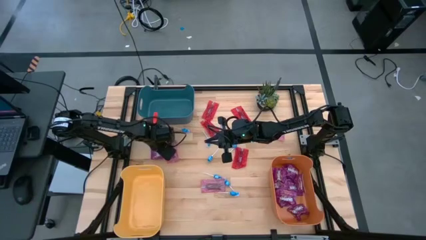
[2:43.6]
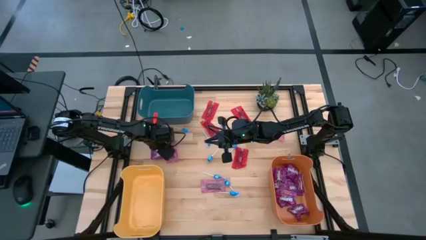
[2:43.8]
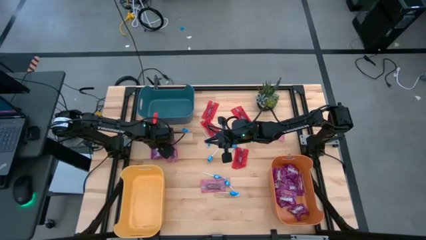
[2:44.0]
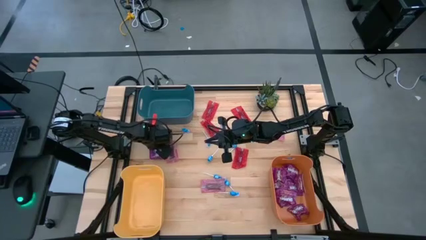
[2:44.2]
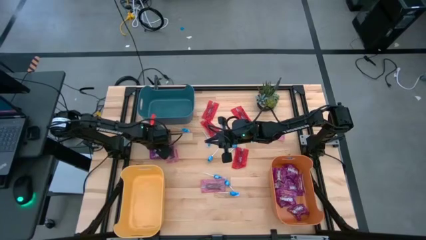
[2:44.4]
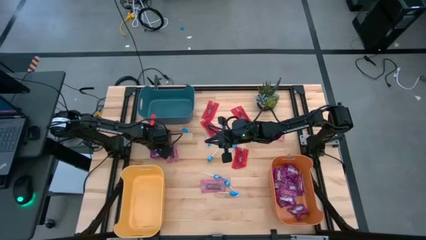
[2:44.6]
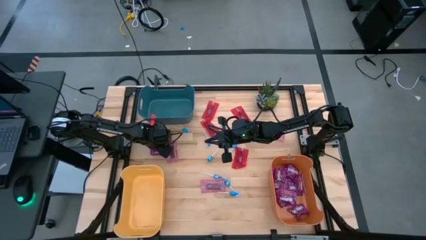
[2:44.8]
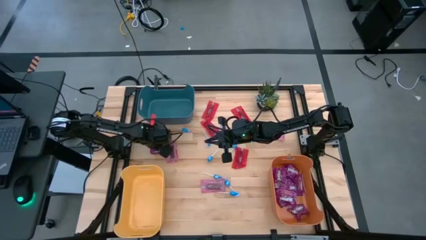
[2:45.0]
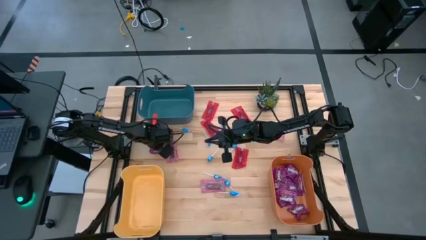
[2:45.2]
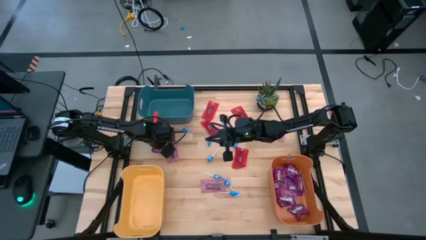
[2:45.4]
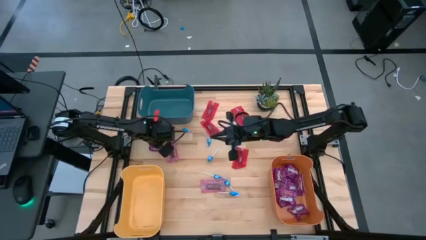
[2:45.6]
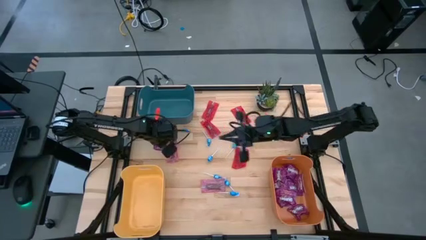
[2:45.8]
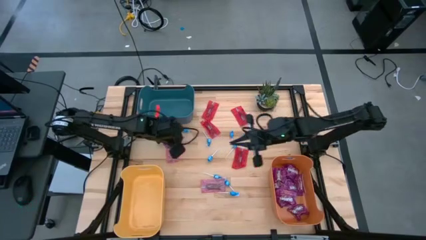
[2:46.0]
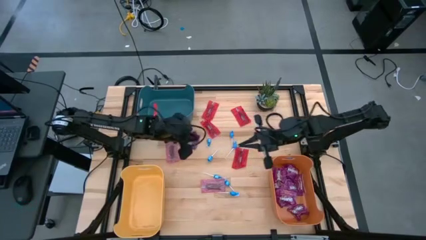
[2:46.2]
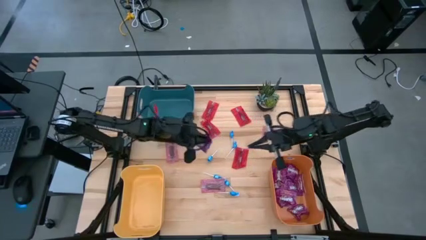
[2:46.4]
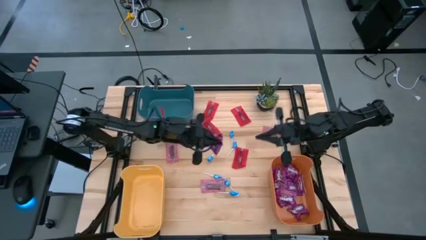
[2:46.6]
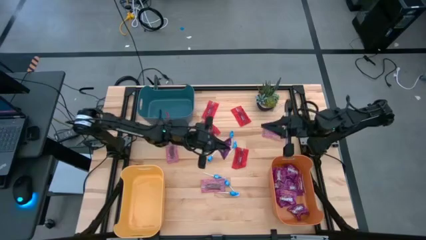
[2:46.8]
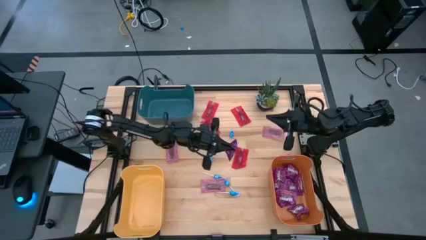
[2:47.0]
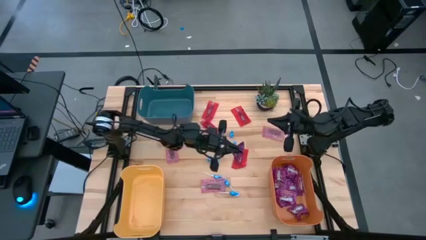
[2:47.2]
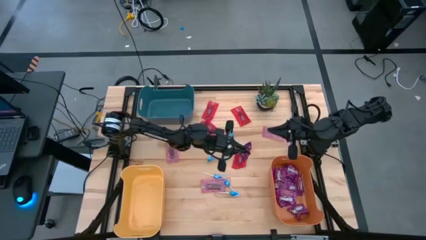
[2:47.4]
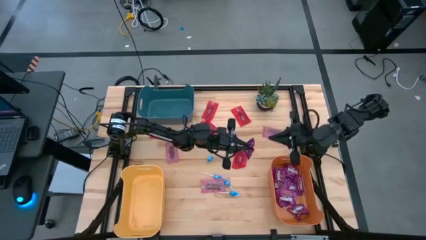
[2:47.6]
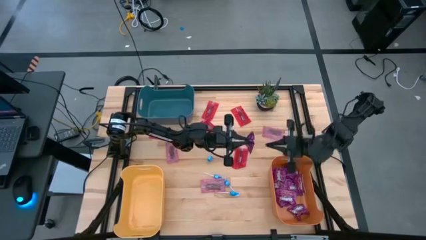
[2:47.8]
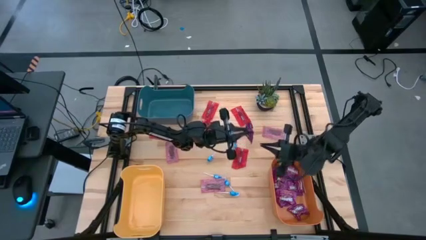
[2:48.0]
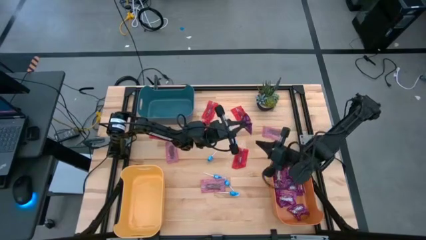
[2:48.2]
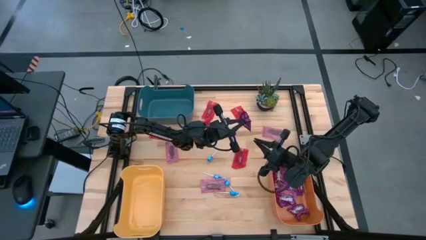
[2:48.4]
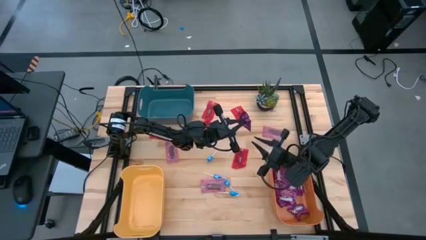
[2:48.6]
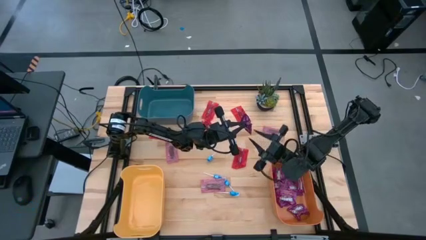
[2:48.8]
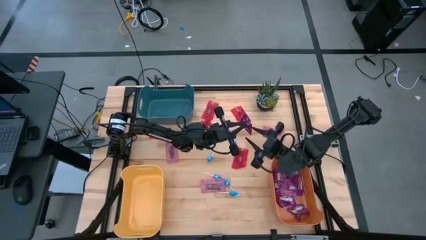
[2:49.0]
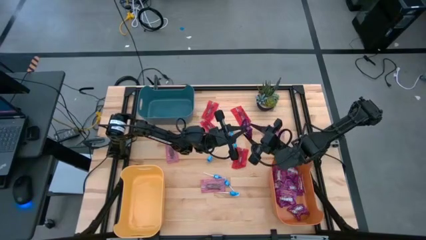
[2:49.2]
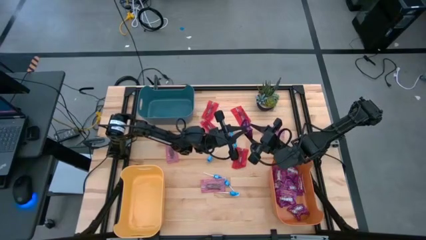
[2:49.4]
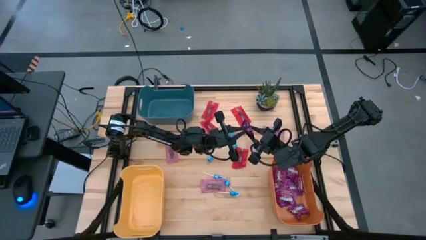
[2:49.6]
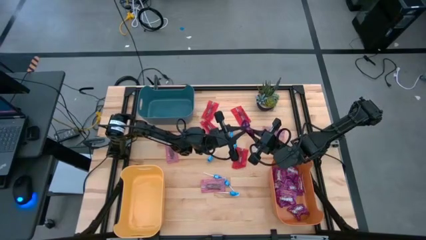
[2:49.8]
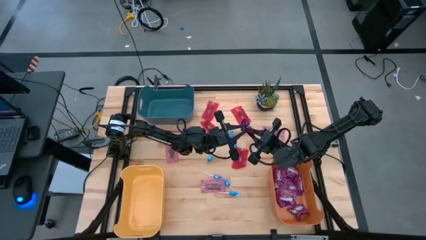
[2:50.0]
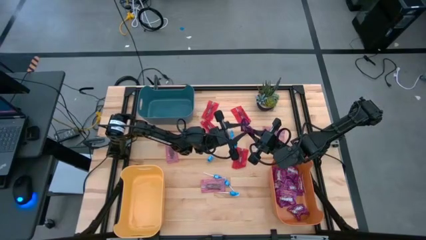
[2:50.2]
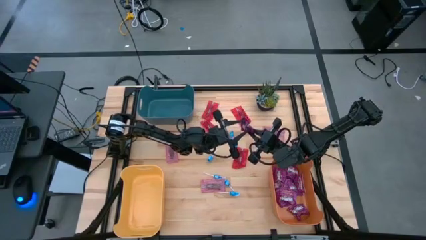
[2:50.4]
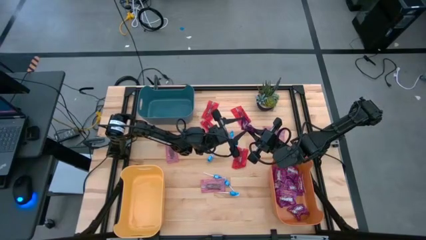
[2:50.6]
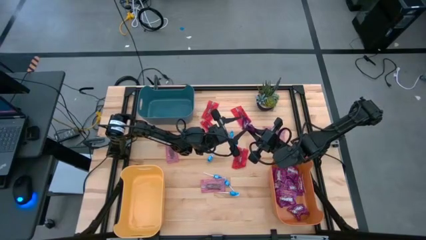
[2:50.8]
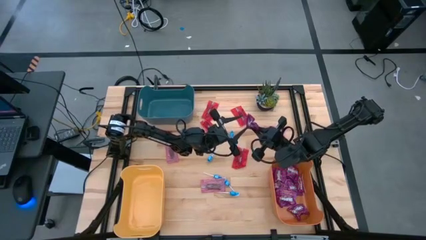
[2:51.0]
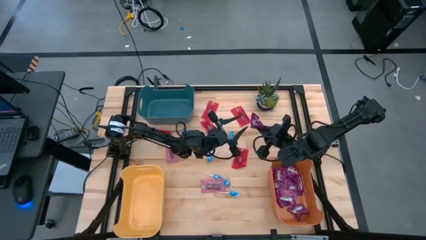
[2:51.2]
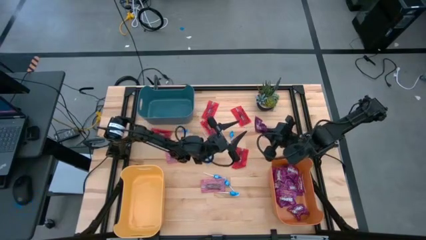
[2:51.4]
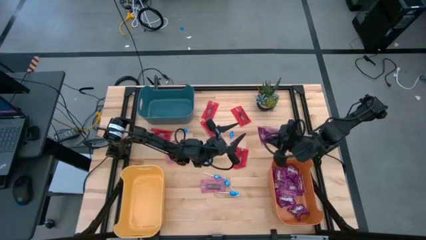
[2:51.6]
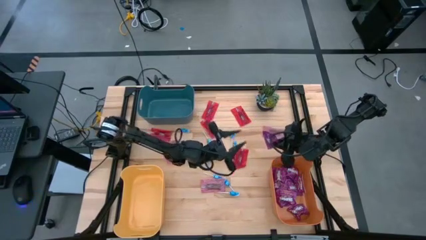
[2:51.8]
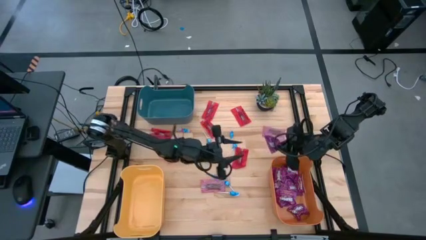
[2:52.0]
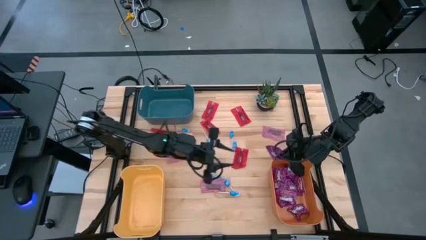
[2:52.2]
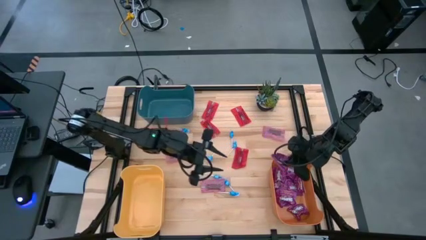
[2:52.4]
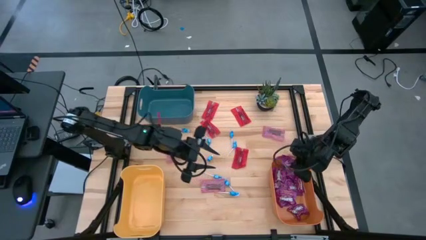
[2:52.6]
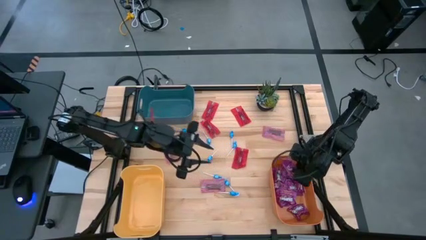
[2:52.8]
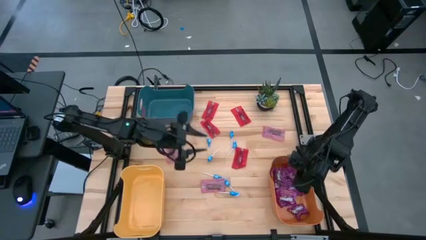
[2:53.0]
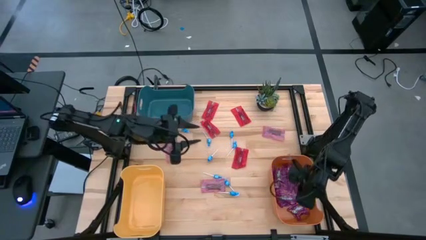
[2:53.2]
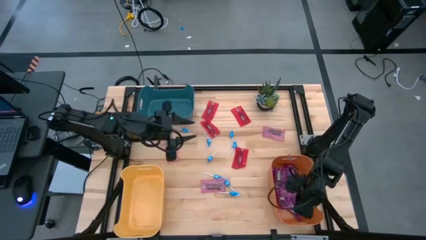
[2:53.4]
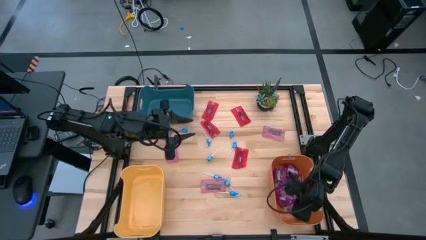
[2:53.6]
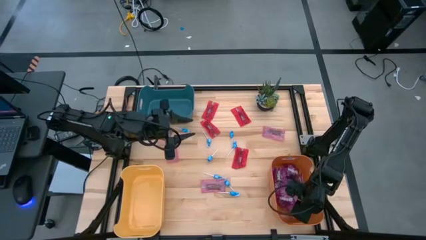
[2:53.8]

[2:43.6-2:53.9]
Task: Sort candy
Put the purple candy into the orange bin

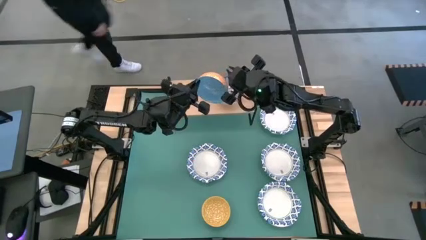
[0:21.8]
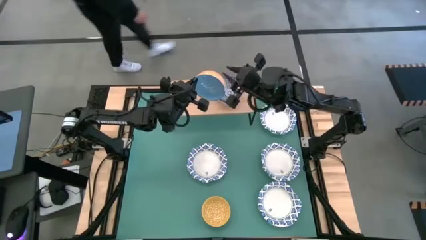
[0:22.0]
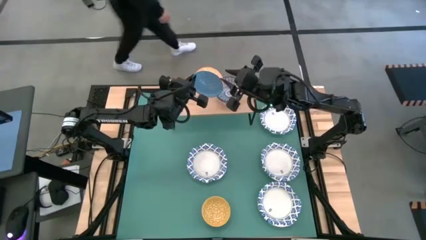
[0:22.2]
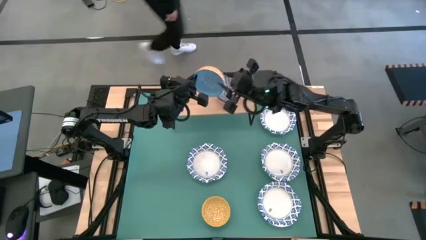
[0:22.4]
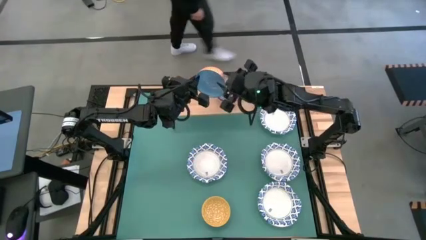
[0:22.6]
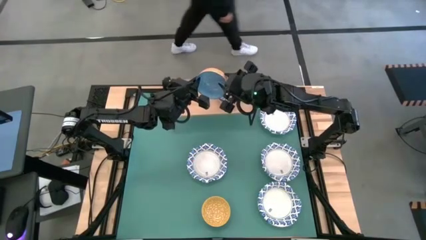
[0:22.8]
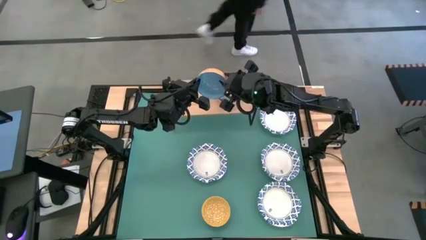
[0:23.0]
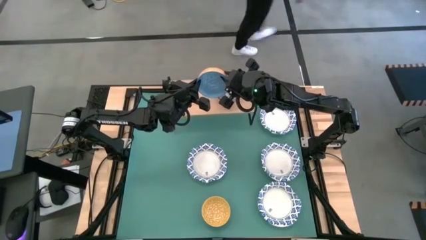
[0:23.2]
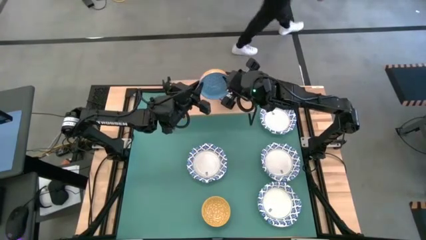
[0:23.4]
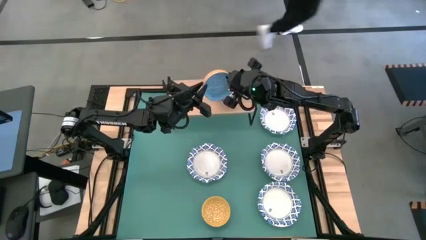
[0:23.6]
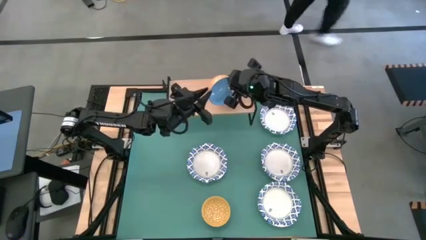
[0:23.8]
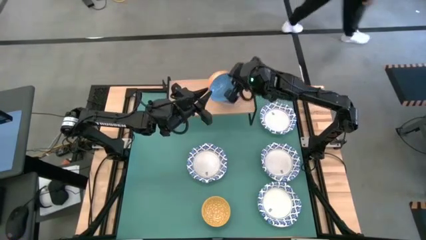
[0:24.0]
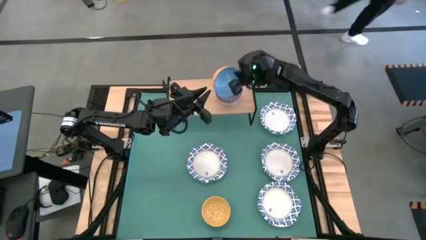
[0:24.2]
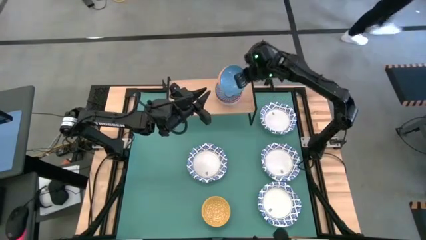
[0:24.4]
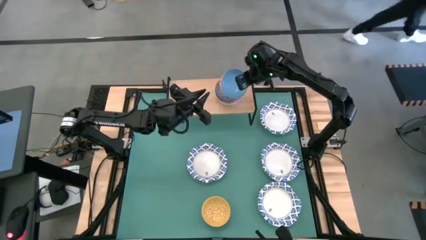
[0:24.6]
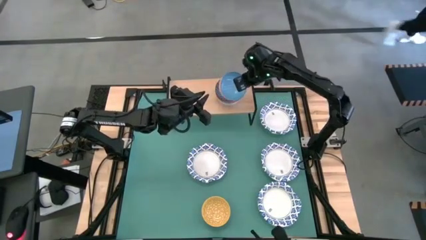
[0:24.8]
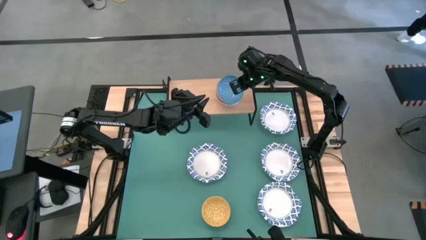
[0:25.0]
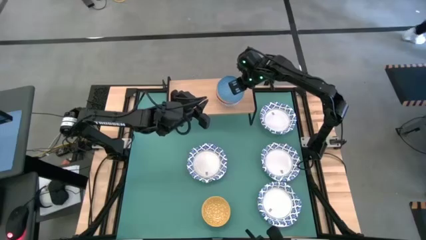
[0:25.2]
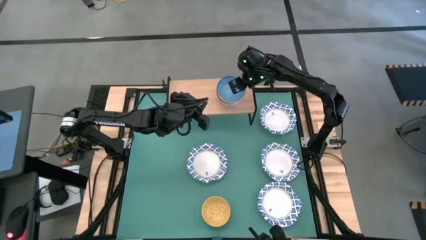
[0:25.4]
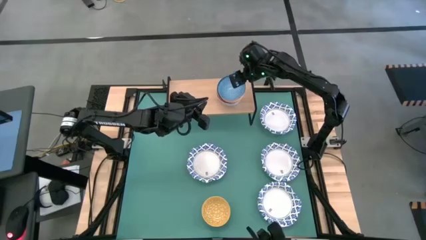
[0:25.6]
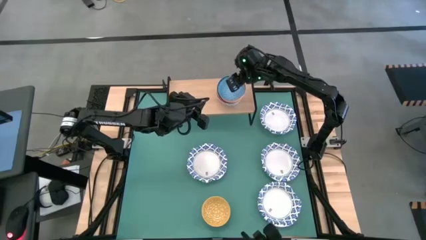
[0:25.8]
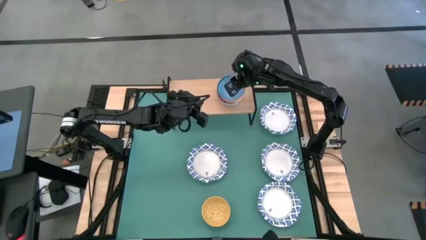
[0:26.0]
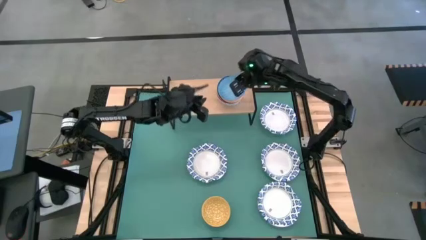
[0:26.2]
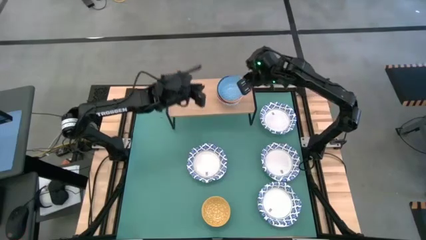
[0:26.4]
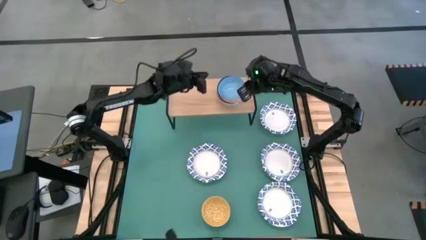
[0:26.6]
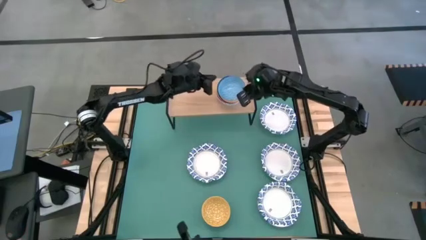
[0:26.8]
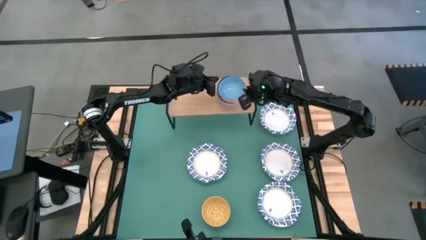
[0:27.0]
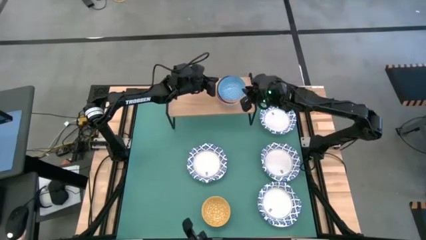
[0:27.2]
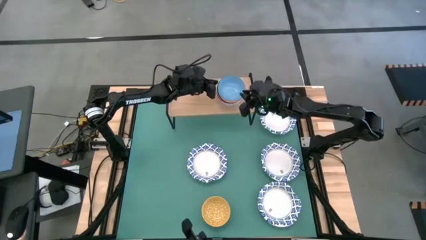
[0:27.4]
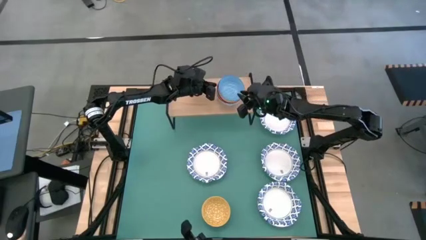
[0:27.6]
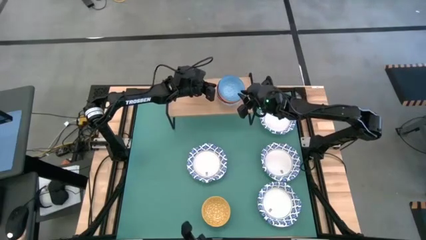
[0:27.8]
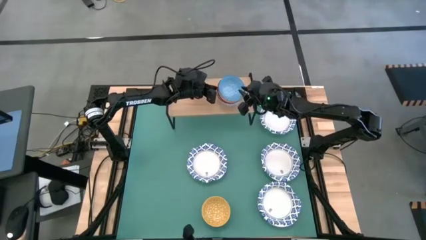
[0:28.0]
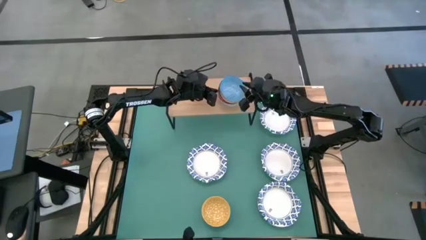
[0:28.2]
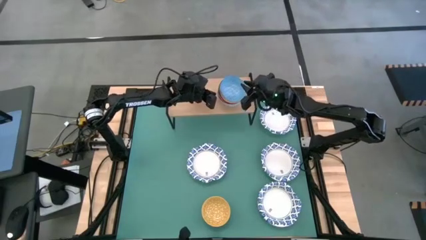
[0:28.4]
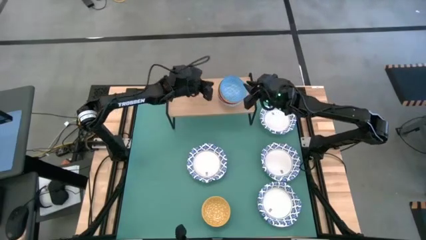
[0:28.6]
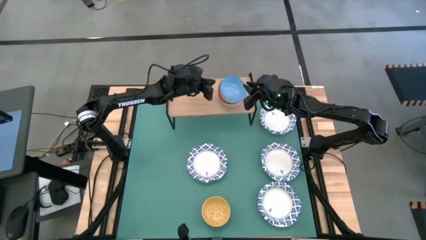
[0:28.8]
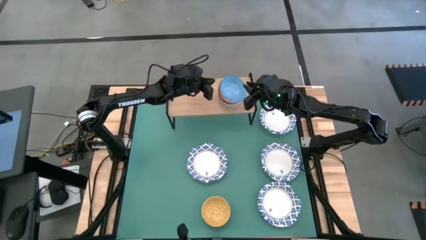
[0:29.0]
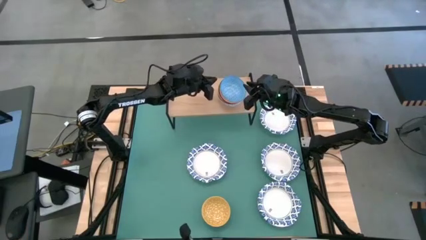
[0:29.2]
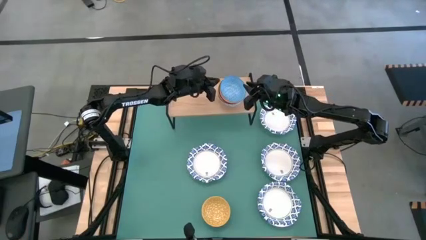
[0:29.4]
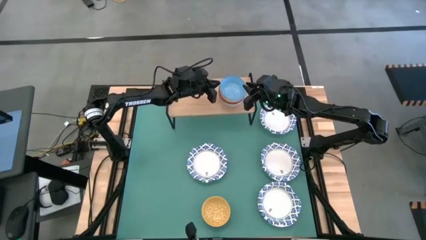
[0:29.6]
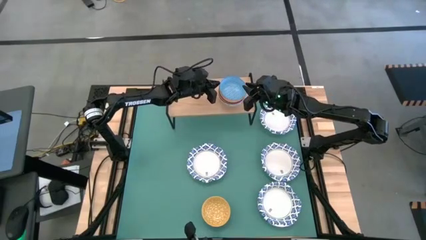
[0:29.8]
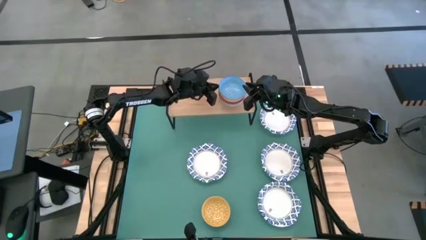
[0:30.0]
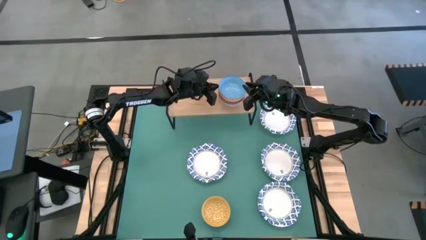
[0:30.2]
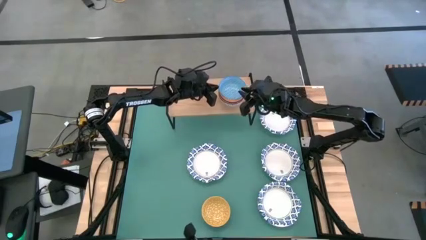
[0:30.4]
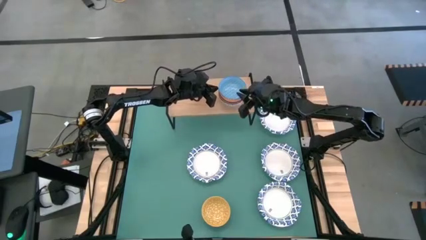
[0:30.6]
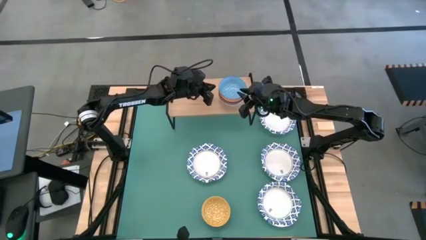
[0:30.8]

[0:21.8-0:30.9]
Task: Place and stack bowls onto a shelf
Stack the light blue patterned bowl on top of the blue patterned bowl on the shelf
